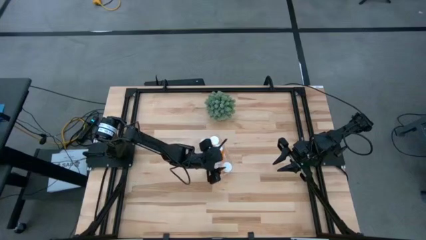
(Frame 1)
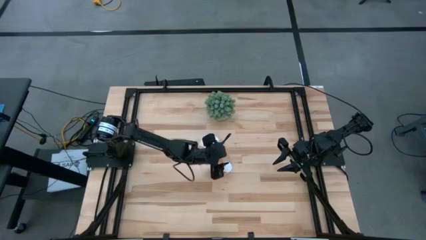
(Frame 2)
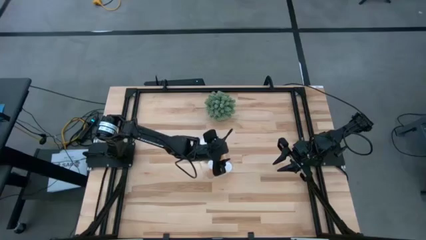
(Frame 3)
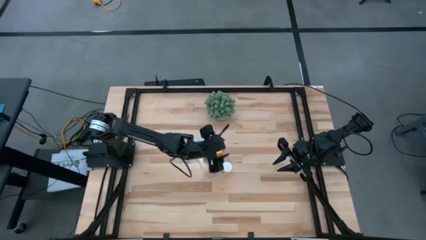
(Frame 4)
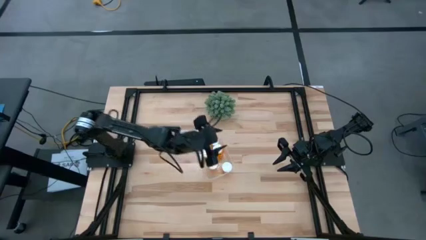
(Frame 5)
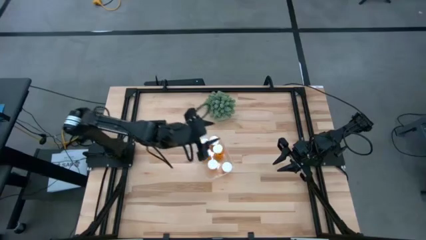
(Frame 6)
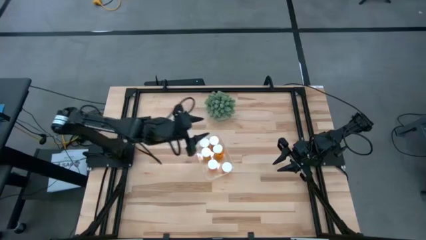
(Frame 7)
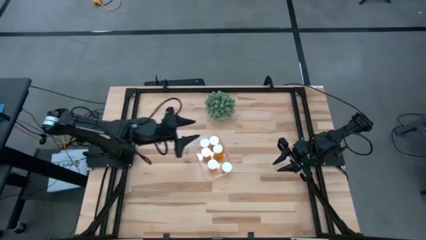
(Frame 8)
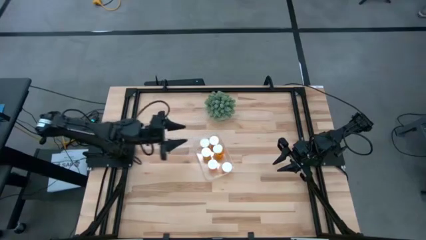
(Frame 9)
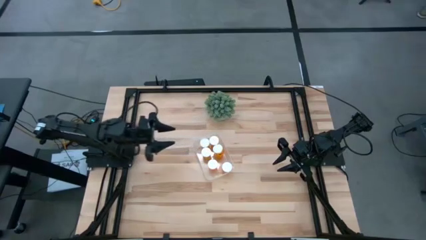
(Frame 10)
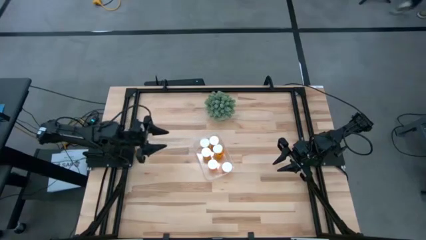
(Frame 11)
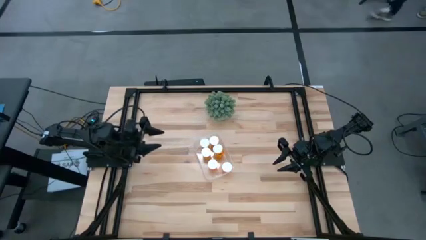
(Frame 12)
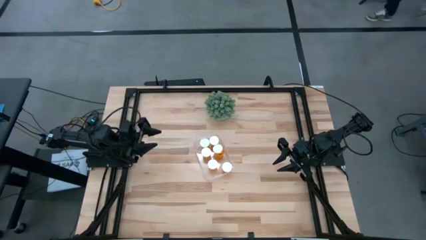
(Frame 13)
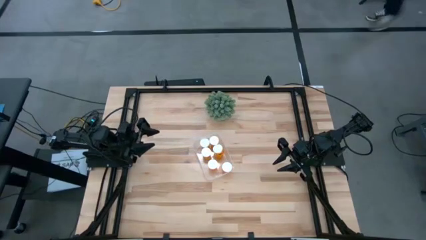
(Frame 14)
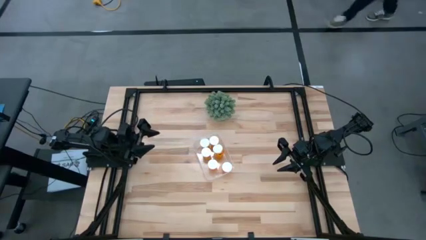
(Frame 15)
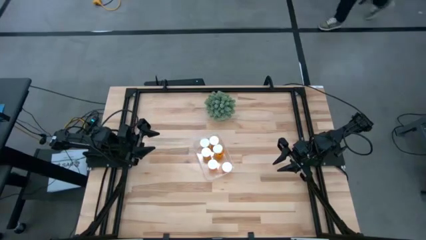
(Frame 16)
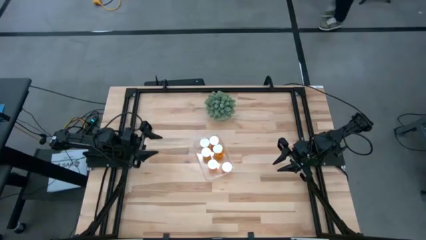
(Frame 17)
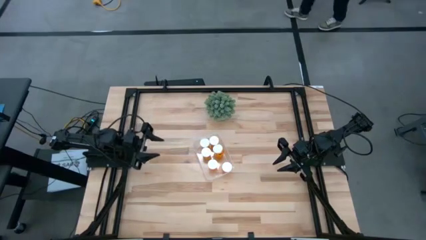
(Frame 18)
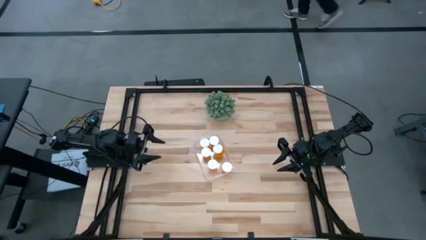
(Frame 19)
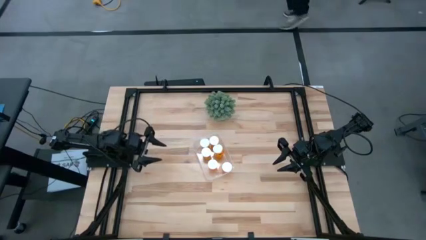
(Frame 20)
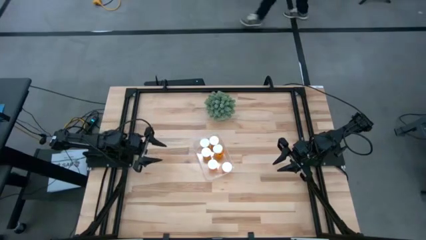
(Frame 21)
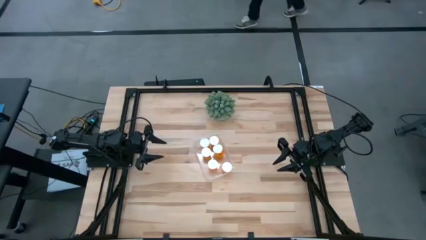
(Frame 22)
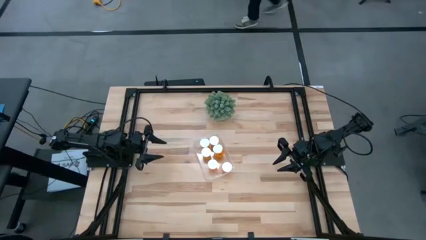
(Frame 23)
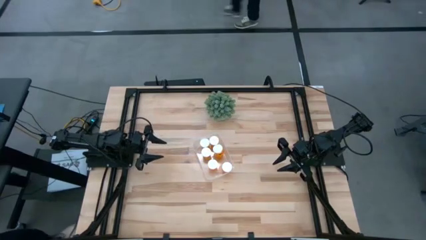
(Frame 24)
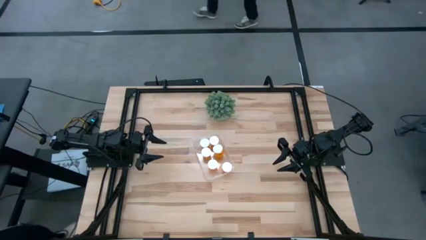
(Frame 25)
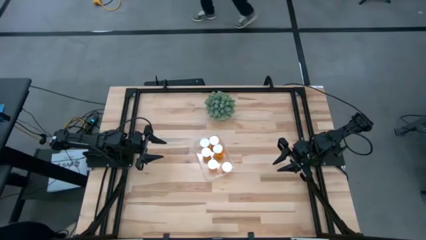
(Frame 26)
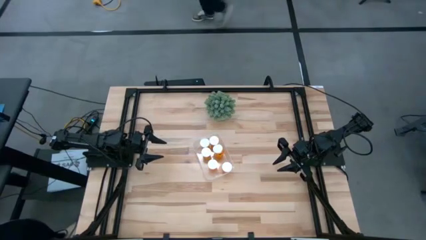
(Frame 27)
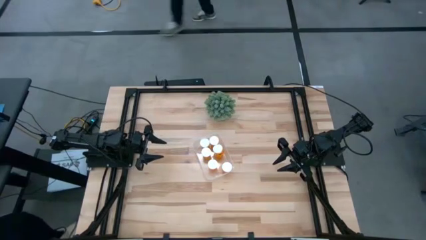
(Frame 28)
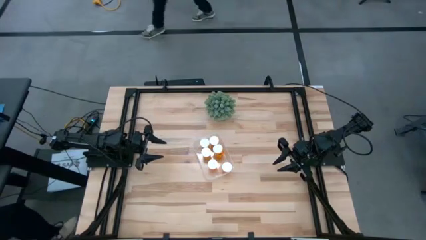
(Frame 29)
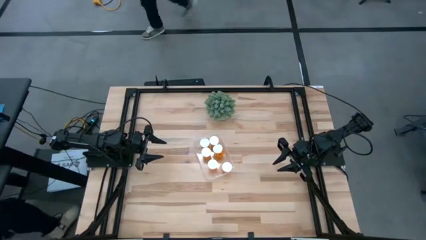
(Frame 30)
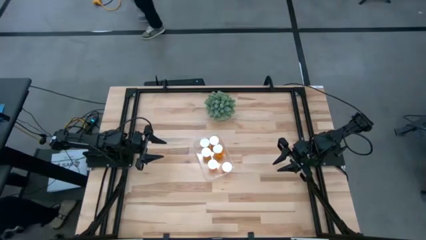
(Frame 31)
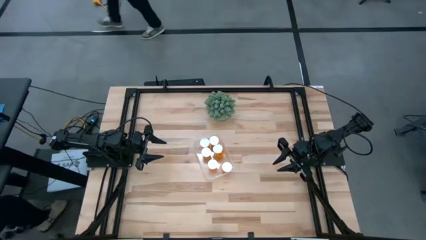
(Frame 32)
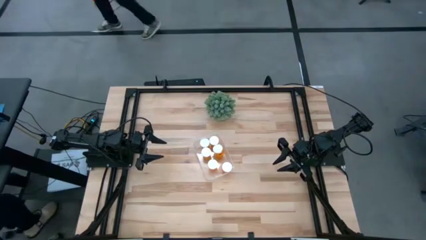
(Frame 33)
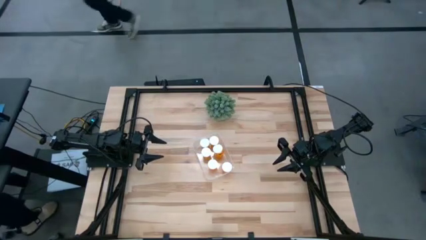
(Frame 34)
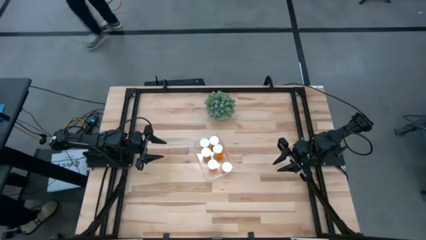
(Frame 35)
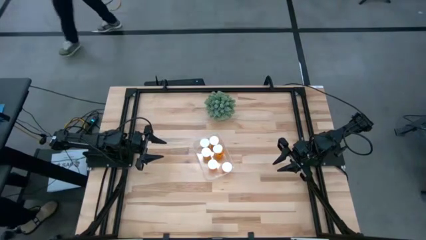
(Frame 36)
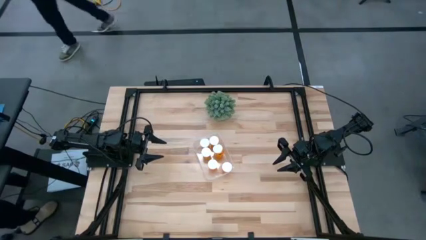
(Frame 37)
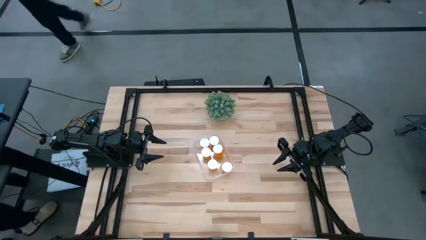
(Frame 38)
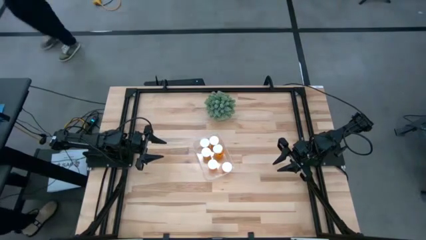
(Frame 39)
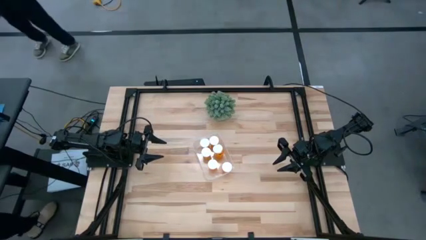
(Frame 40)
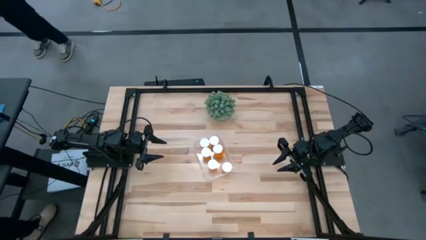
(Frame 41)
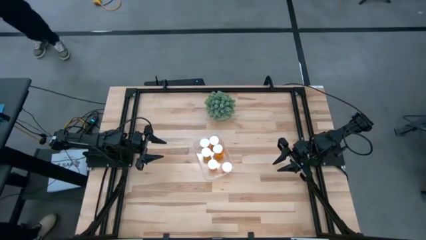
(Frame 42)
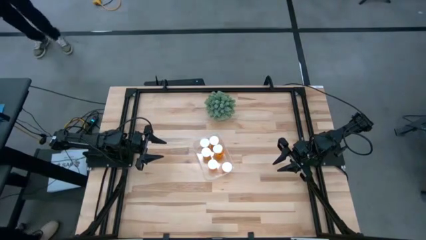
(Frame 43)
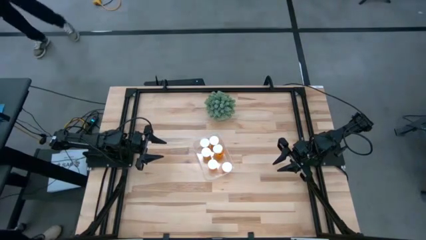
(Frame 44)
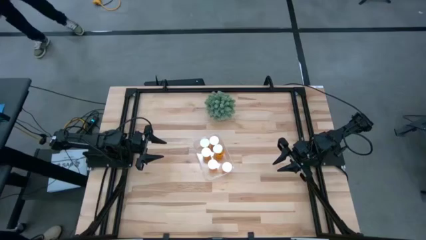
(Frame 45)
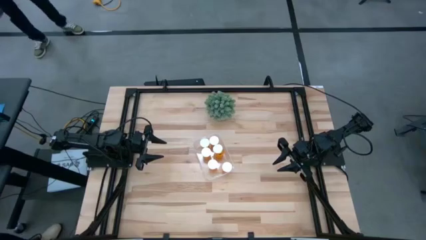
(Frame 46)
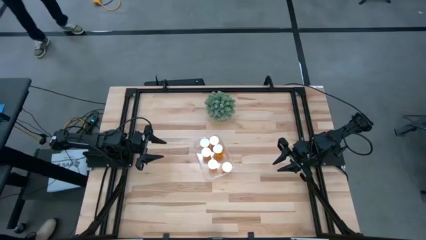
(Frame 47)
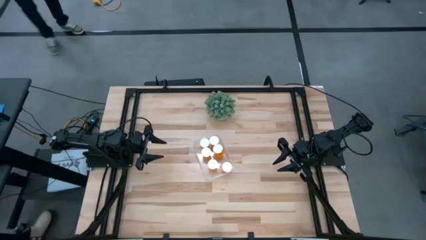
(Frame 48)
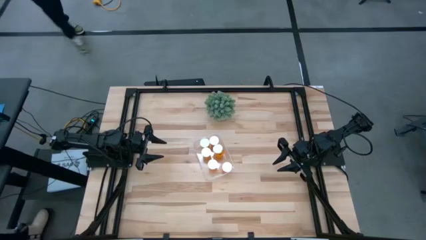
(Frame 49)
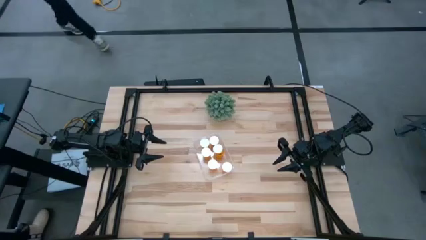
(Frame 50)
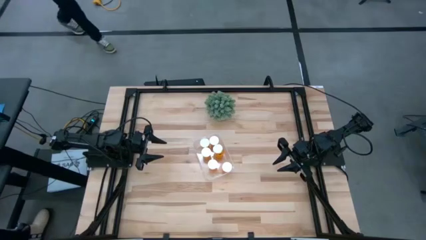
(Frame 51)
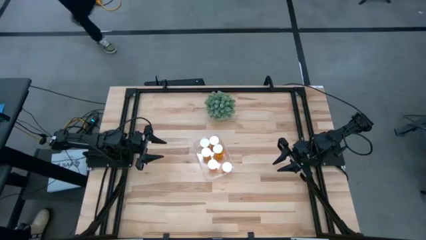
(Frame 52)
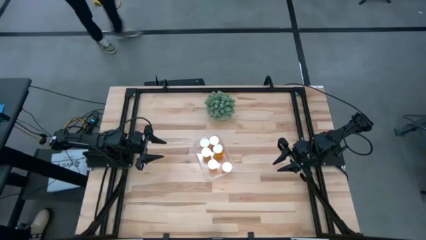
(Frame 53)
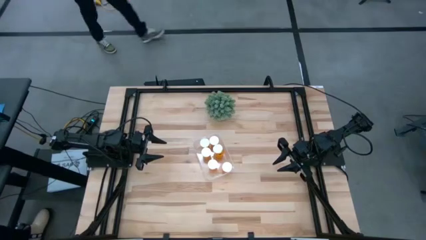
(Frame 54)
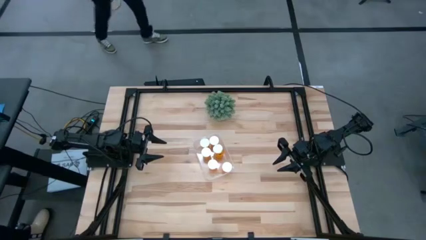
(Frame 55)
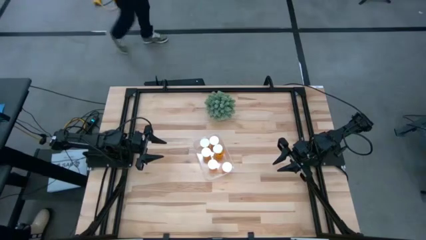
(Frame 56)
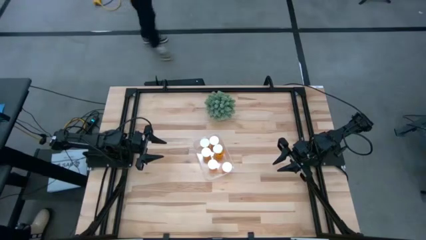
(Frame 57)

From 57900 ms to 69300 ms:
Task: Pick and place pill bottles into a basket
Return to Home Position

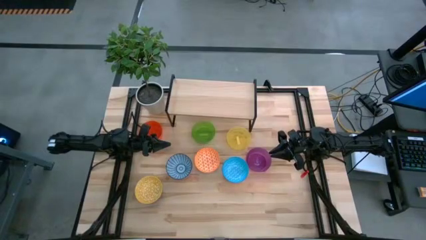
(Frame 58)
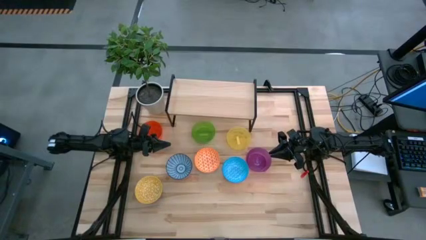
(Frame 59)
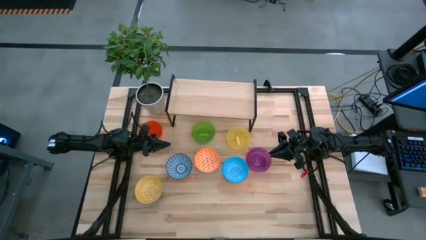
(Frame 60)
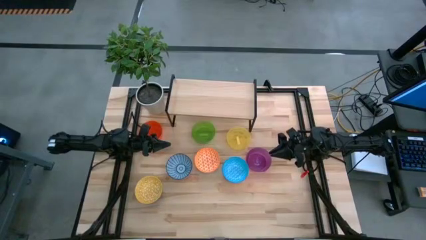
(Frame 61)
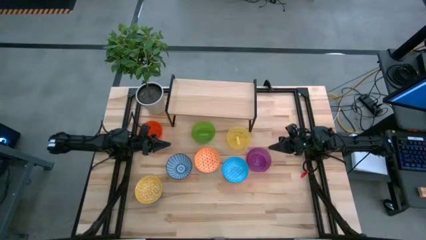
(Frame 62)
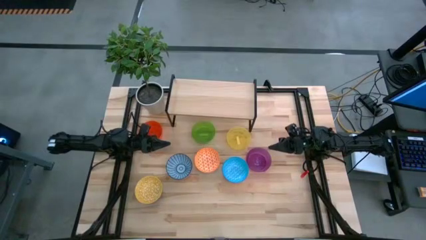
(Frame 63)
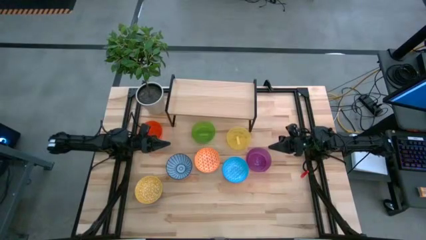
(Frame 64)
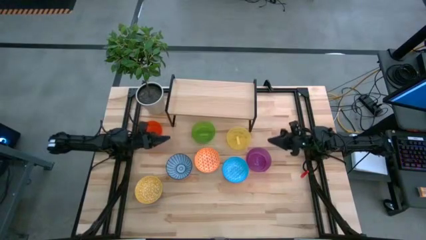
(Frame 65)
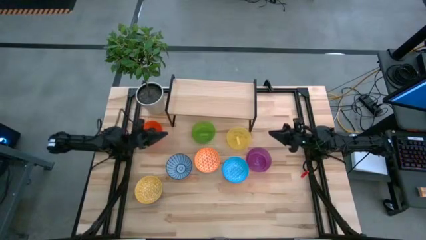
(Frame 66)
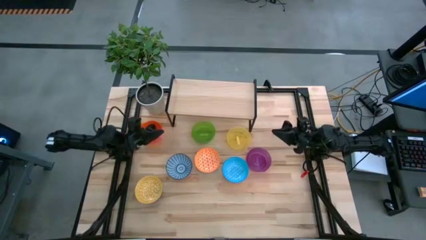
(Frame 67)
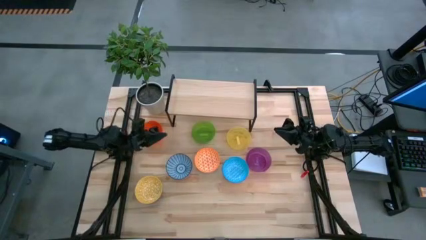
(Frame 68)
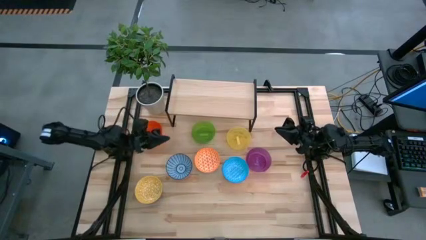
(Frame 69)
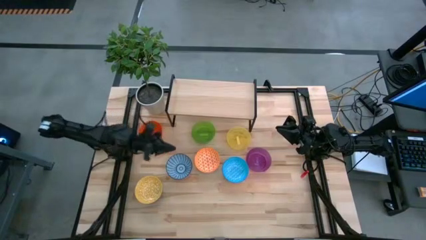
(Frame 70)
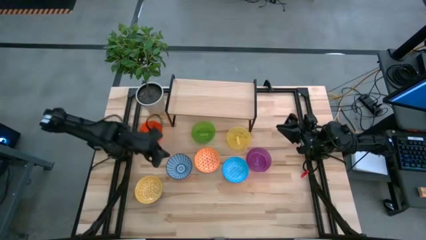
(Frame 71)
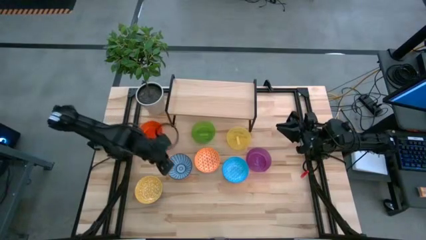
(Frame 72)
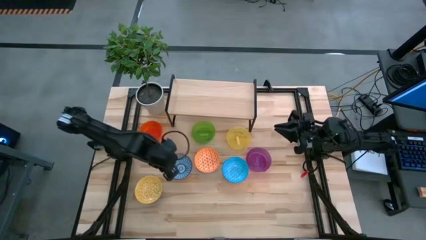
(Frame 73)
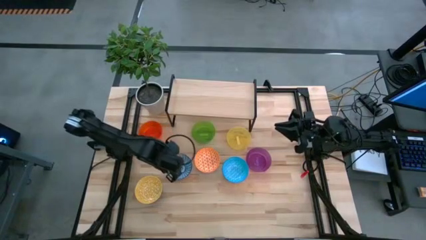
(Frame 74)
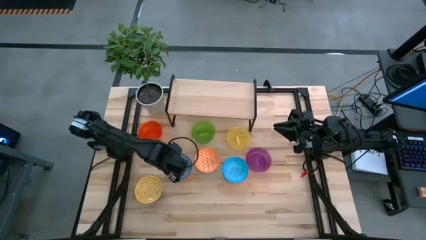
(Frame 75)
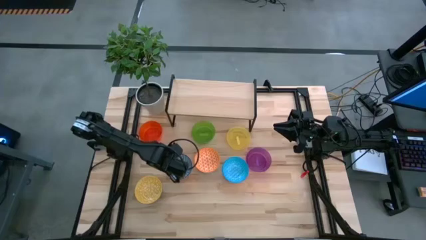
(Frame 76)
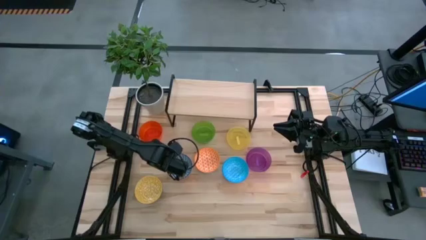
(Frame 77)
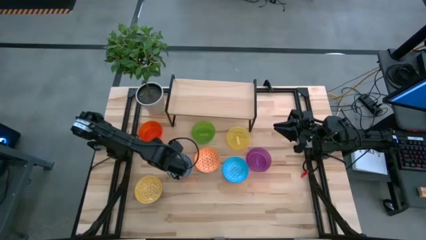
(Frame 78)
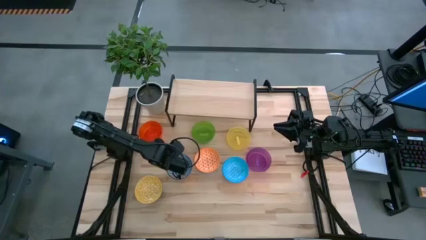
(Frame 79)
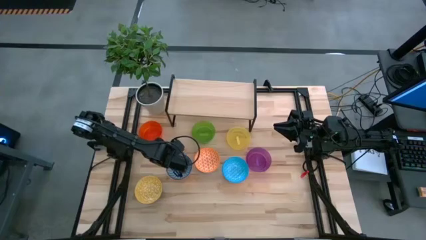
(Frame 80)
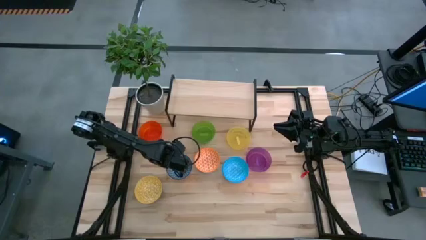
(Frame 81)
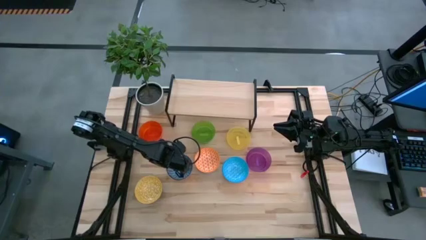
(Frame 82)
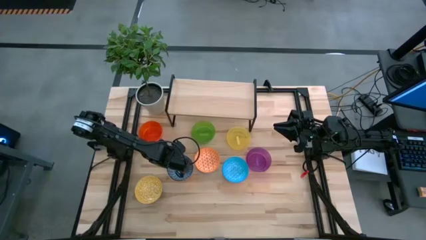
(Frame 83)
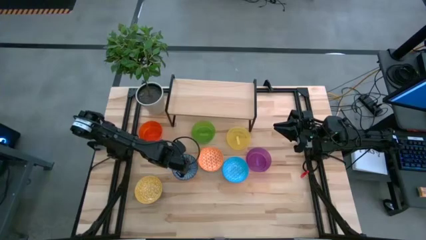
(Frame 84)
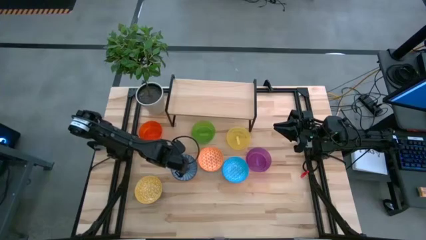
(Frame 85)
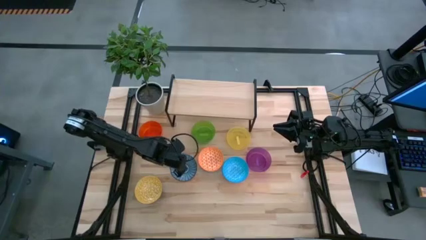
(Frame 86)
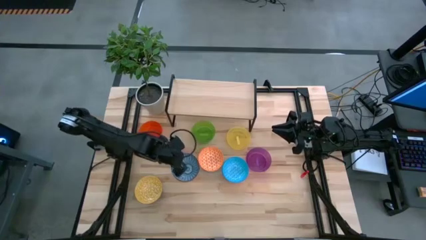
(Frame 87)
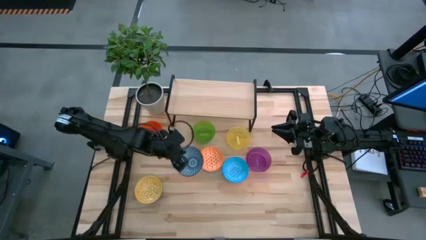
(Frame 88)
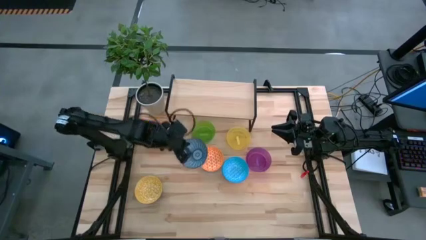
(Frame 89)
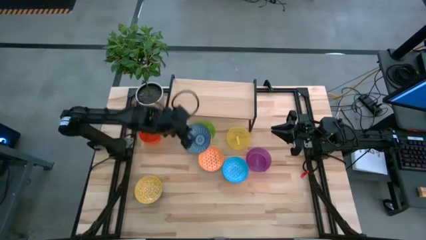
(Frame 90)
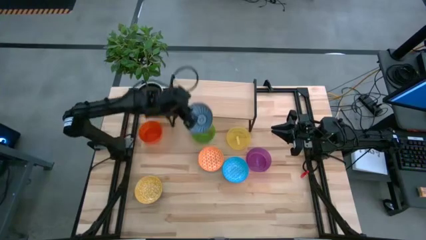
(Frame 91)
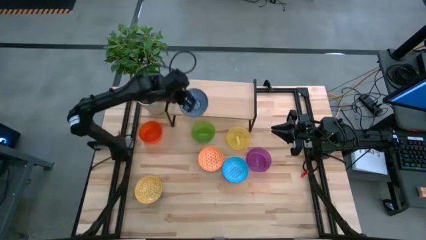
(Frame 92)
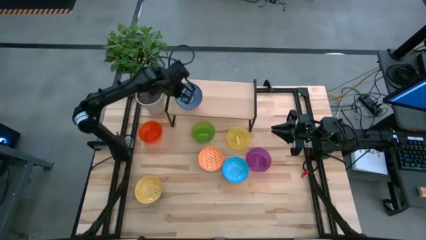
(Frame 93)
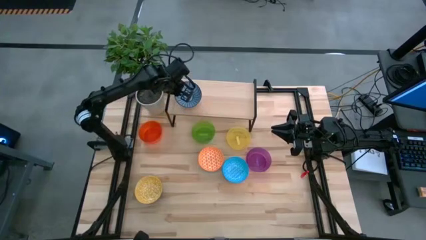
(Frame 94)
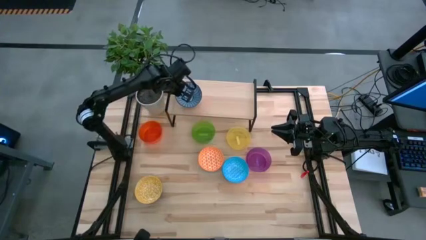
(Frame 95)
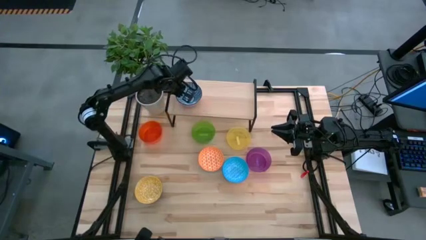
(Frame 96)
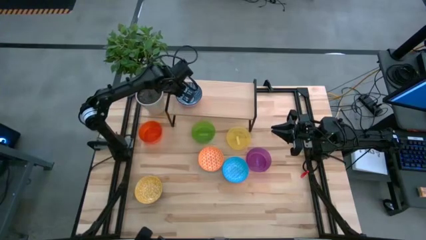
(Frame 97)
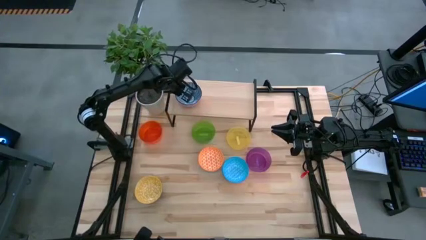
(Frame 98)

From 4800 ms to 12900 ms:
Task: Place and stack bowls onto a shelf
Put the blue red bowl on the shelf
